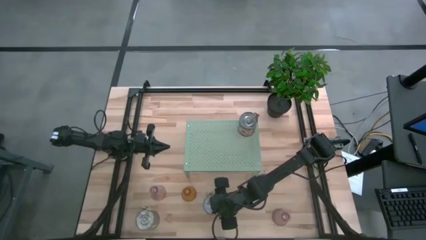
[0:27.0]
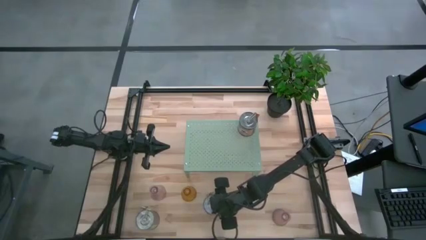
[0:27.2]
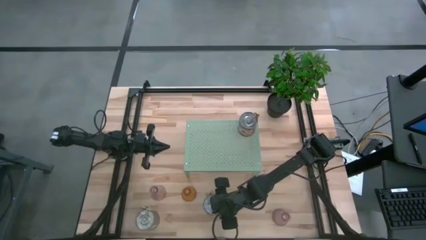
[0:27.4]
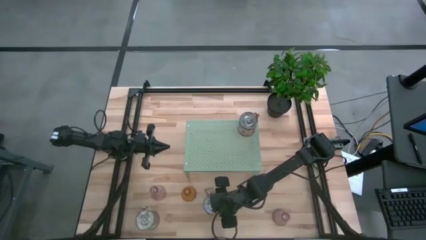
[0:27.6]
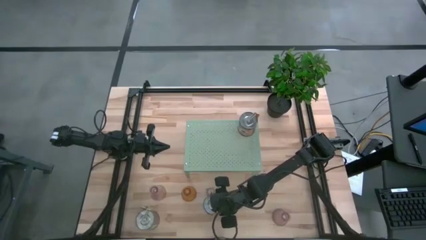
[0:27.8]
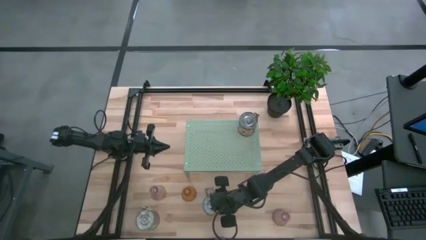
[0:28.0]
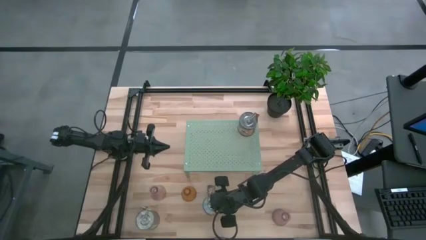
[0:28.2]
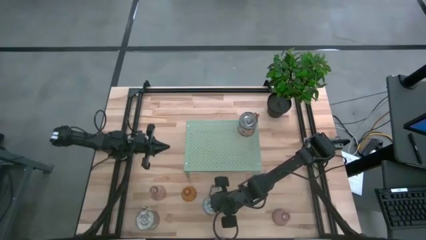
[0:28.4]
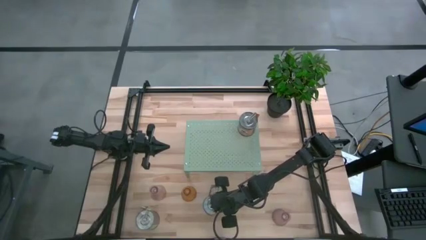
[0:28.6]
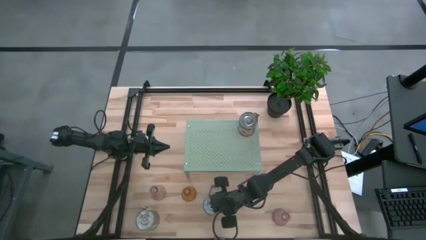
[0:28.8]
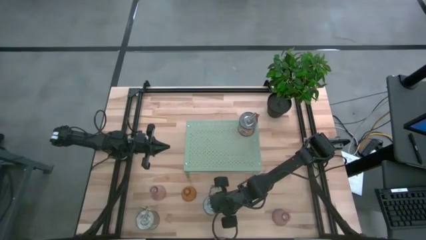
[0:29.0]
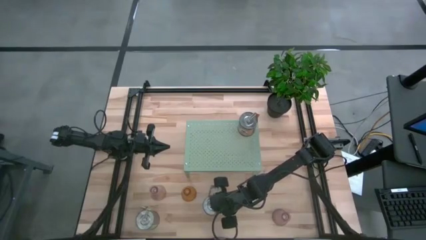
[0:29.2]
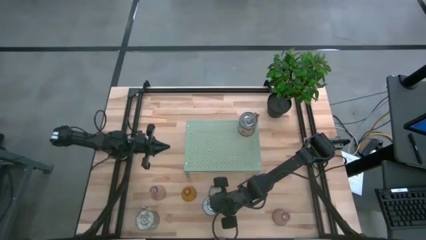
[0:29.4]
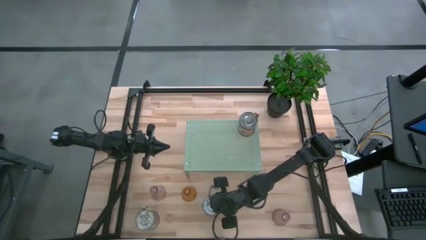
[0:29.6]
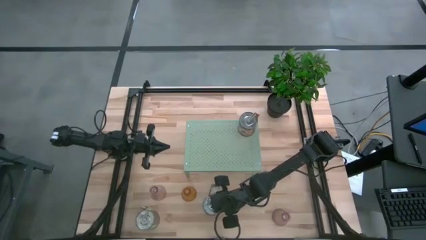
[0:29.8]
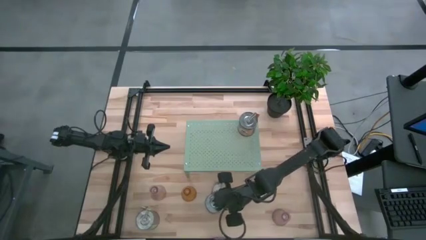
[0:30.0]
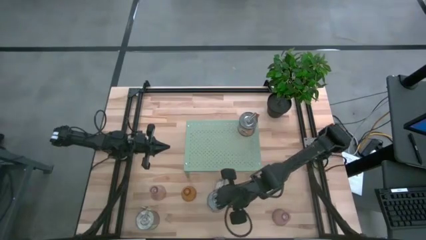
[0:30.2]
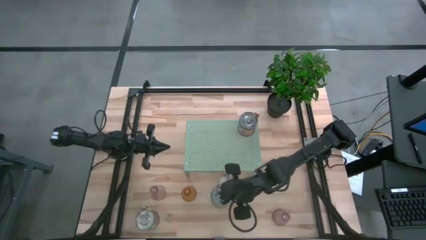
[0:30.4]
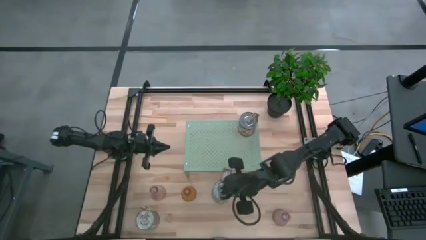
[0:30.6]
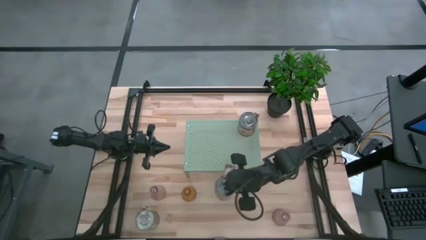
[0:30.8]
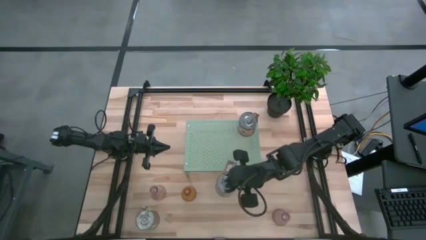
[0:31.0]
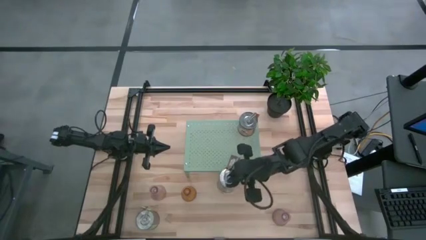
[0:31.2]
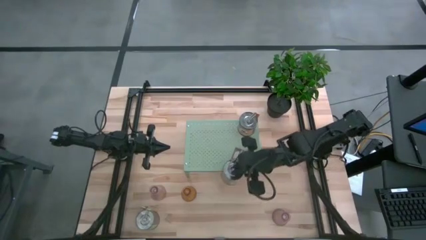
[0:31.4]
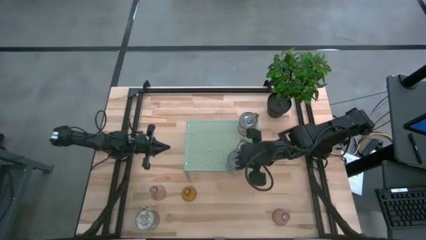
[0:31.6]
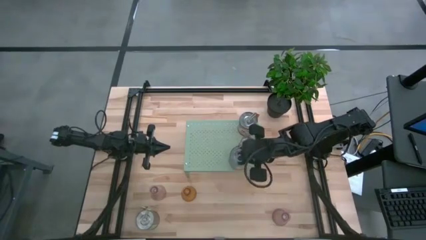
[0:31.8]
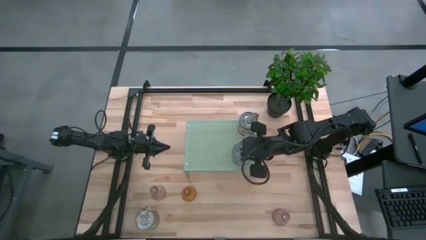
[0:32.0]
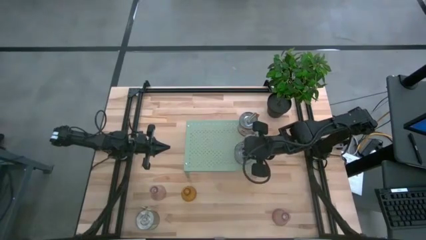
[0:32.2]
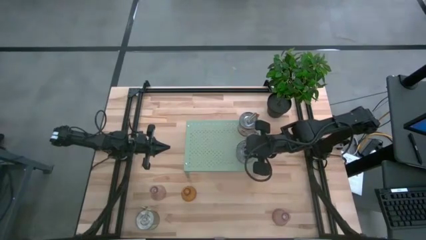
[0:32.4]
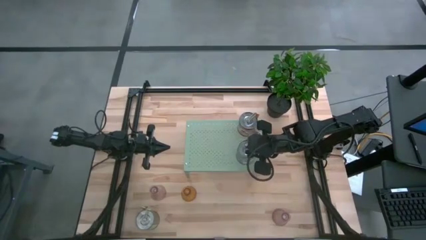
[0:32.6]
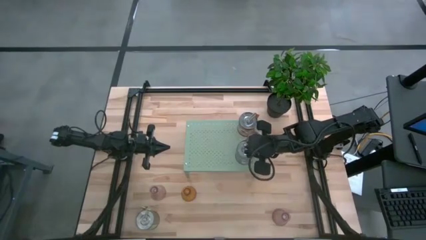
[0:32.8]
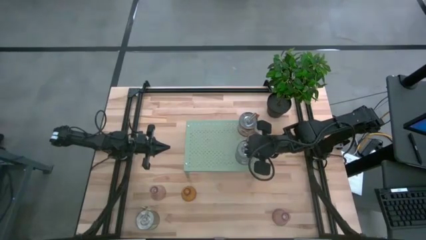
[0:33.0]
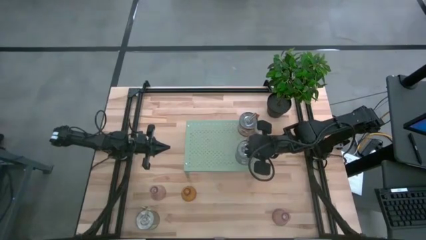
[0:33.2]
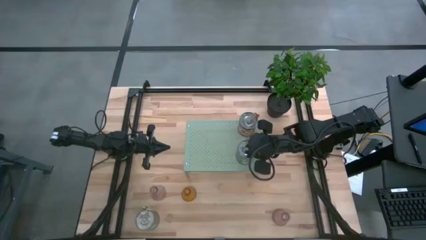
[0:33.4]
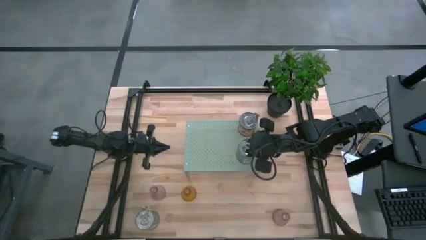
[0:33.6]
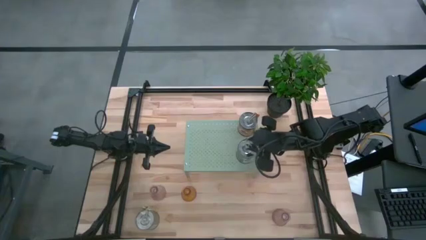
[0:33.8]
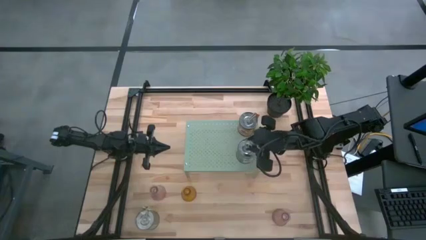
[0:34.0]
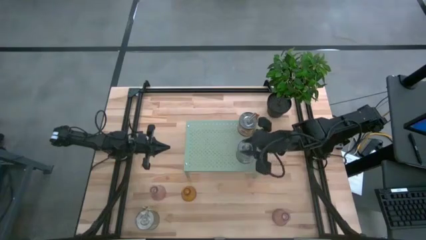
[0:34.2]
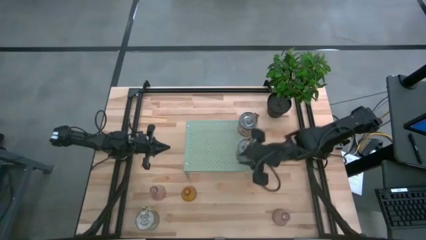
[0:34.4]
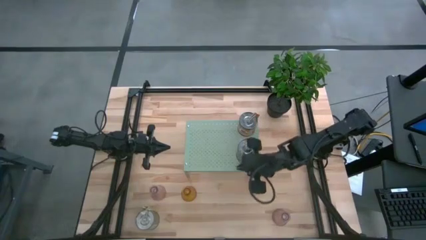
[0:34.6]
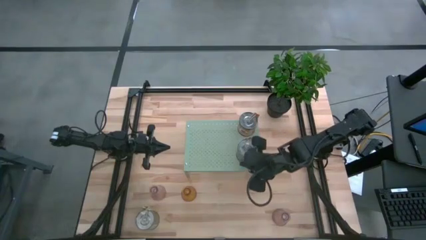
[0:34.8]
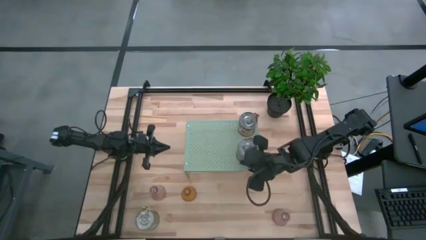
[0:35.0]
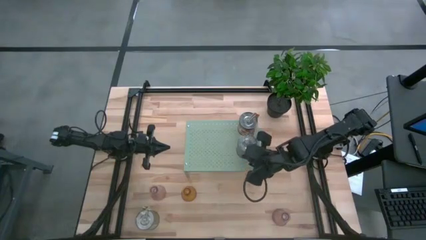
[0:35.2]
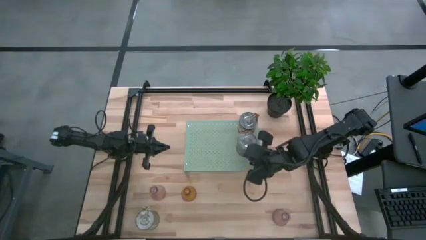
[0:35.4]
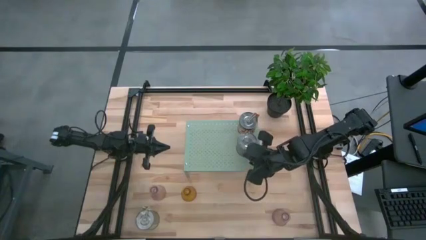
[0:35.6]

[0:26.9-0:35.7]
Task: Pick & Place candle stick holders
Put the brown scented candle on the shelf
